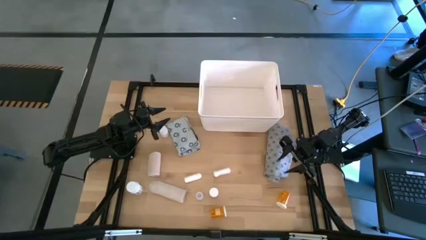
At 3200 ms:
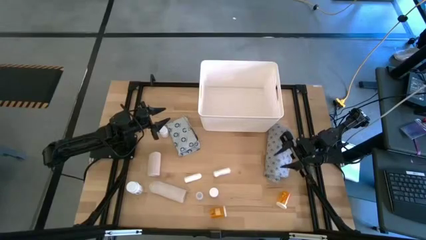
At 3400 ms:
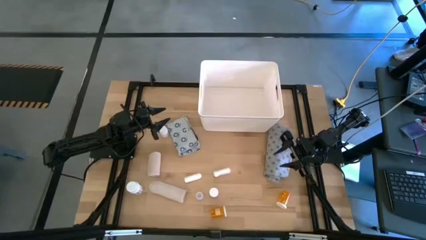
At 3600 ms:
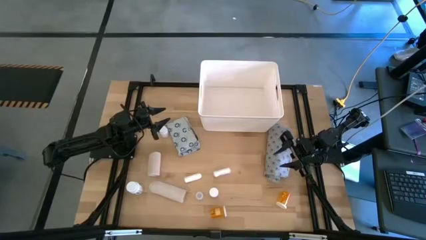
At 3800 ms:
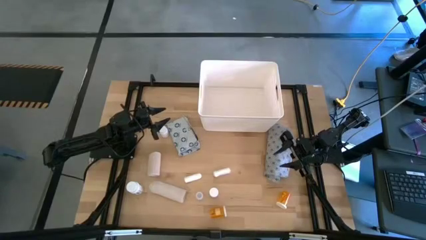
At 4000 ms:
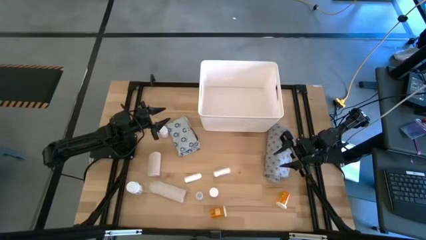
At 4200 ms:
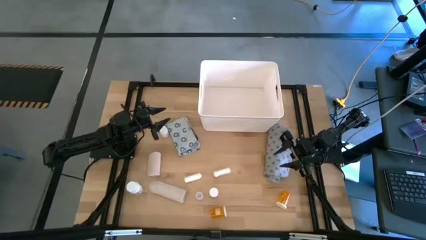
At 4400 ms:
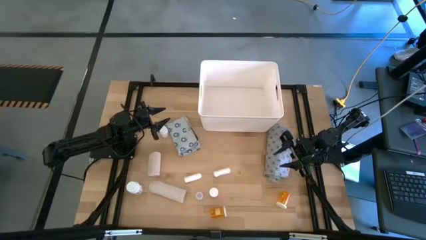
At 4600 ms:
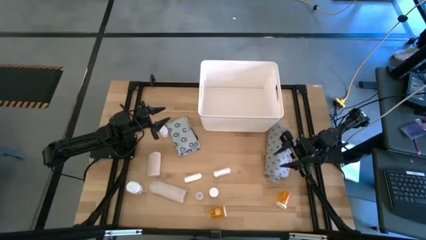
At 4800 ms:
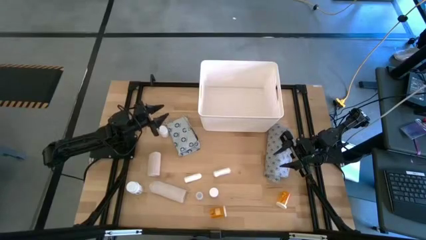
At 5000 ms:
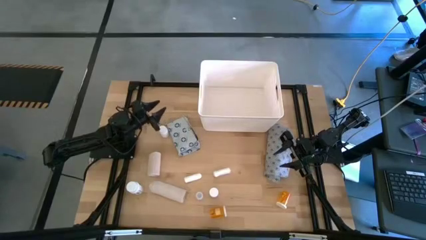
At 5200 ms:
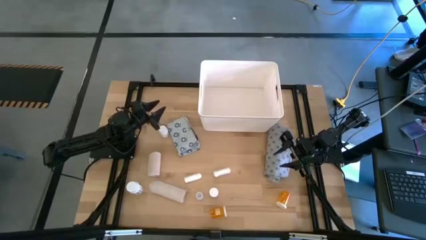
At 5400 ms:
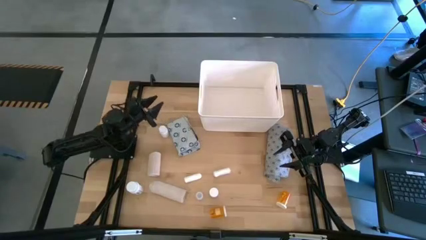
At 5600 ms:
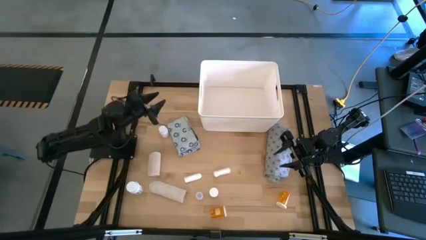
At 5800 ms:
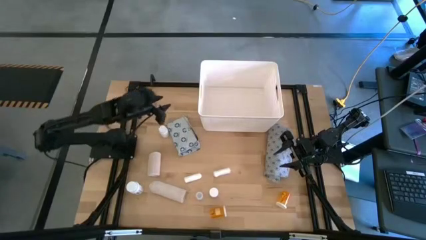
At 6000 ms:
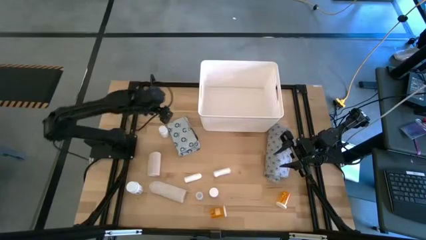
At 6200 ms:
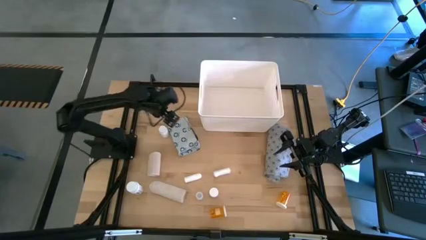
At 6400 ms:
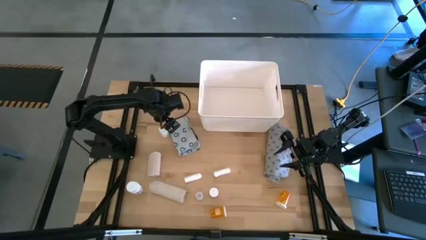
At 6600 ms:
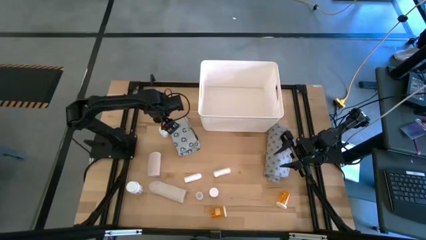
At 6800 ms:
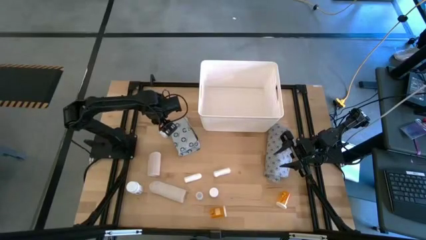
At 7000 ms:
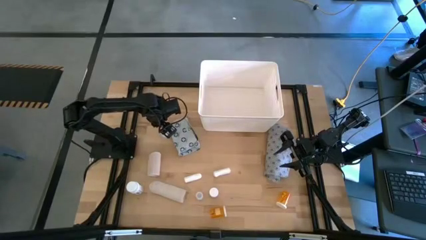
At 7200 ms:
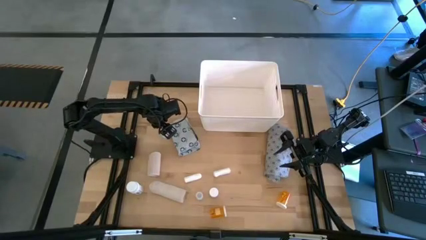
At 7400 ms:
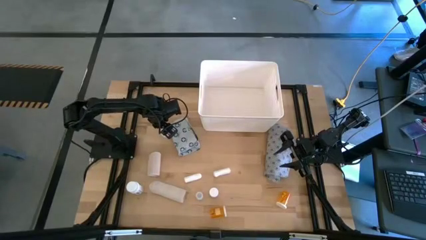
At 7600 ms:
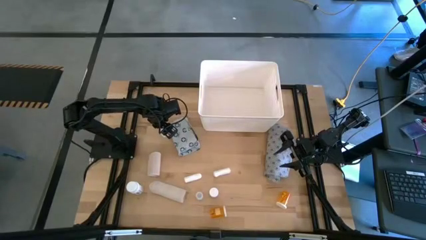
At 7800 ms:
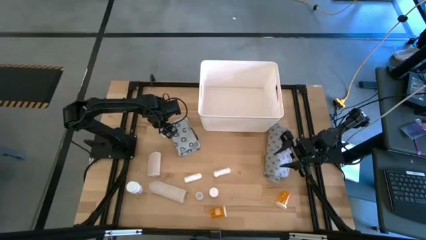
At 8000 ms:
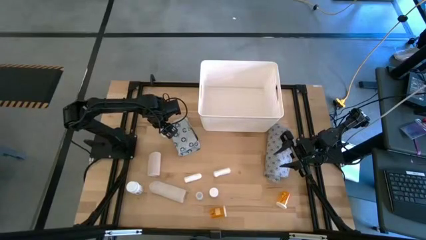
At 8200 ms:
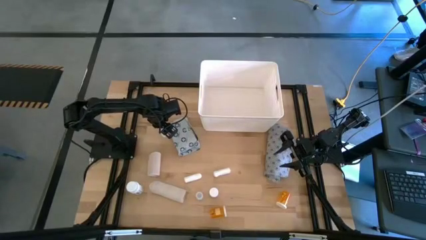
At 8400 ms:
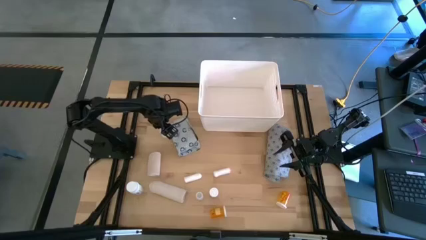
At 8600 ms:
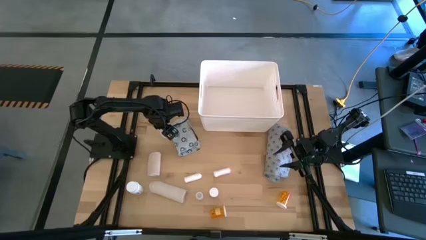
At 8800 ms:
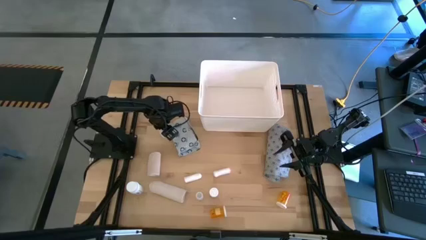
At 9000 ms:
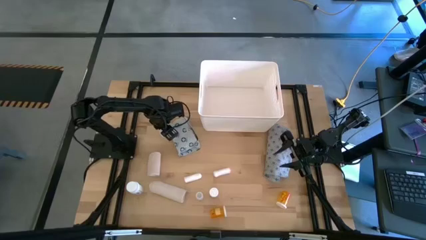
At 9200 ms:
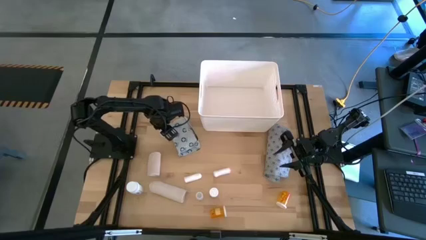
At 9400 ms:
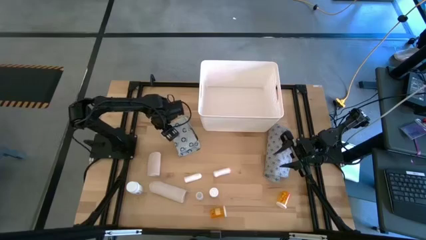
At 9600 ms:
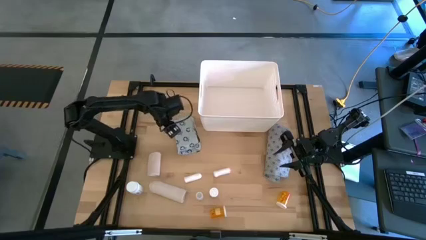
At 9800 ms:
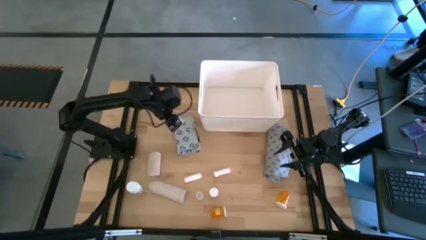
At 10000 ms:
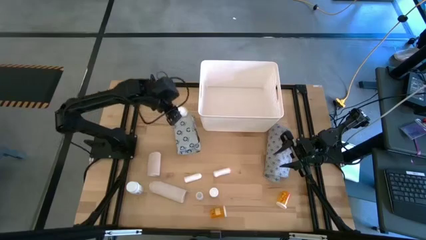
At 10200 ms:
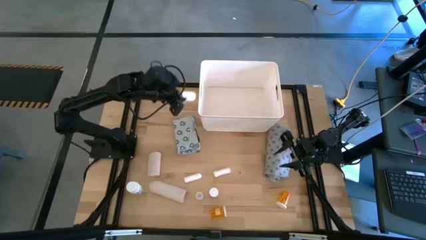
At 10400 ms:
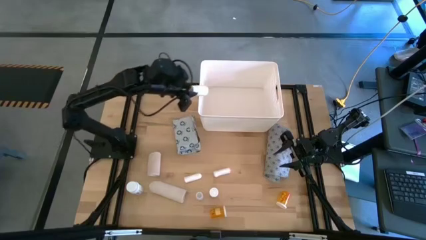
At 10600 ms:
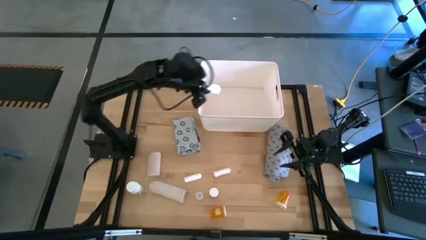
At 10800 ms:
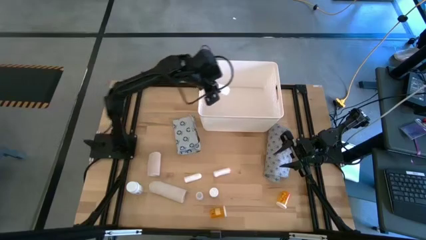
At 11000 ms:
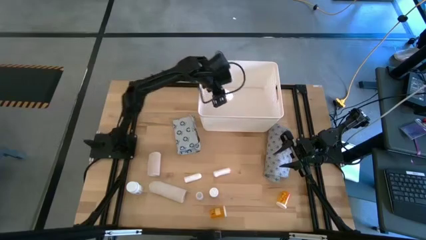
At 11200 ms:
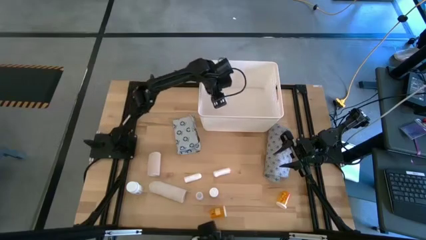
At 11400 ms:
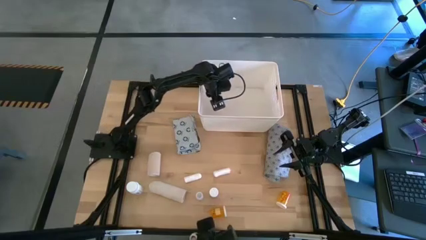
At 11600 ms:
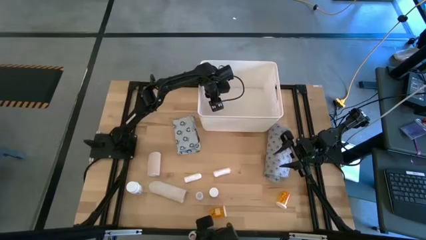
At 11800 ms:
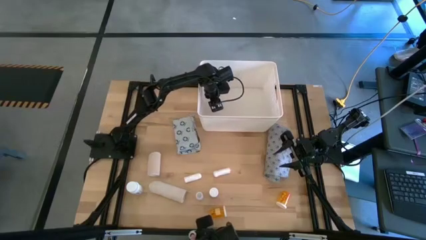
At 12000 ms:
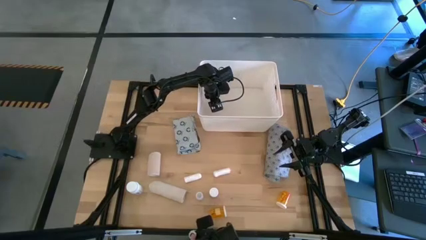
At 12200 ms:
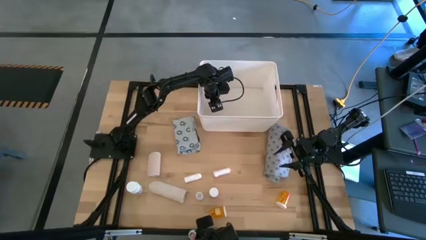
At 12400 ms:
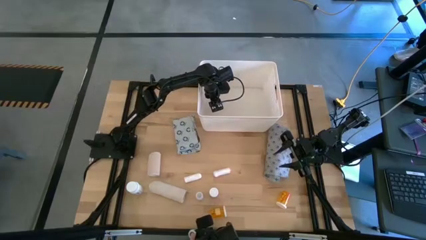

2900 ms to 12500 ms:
Task: Pick & place medical supplies in basket/bin
Put the top white pill bottle into the white bin

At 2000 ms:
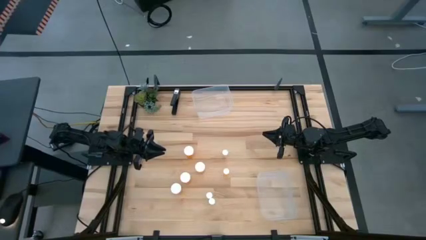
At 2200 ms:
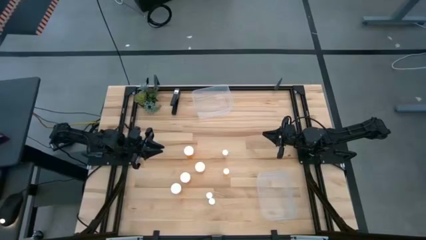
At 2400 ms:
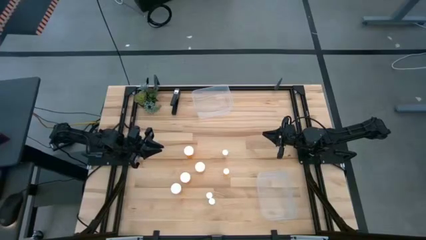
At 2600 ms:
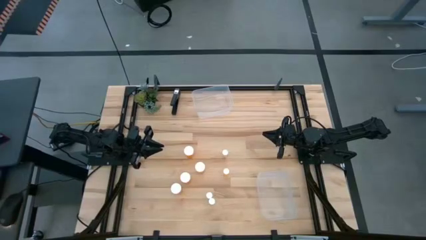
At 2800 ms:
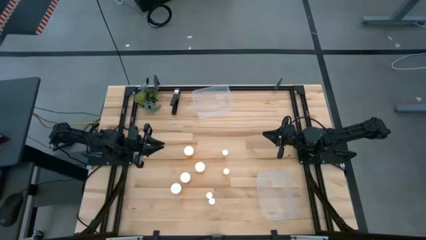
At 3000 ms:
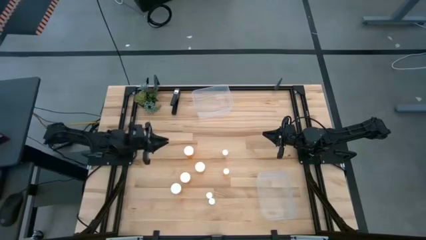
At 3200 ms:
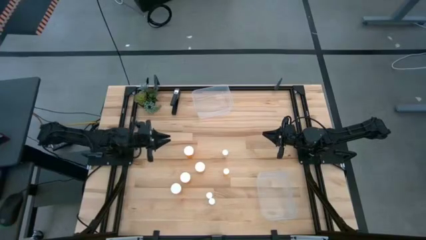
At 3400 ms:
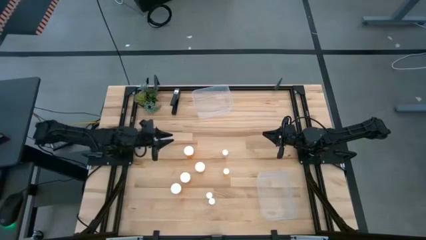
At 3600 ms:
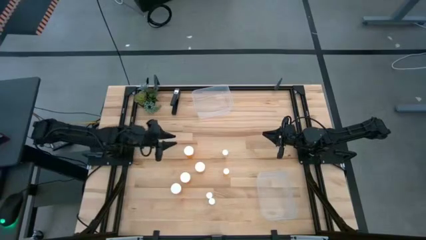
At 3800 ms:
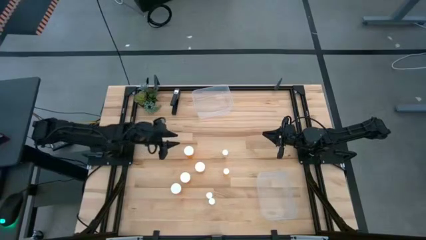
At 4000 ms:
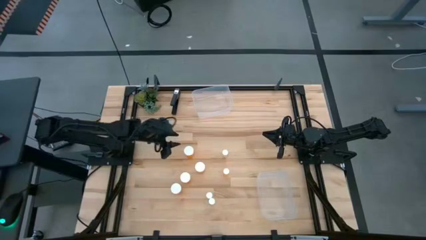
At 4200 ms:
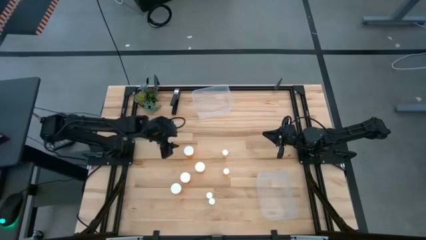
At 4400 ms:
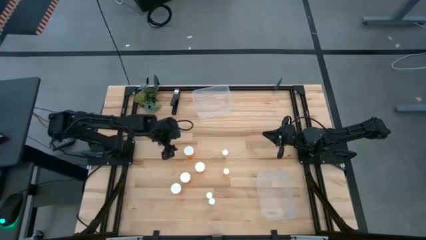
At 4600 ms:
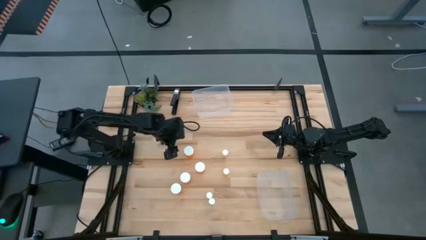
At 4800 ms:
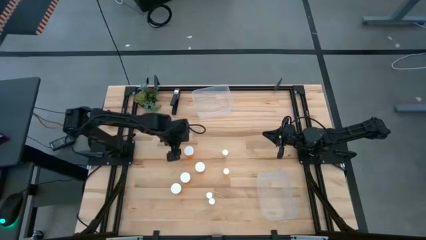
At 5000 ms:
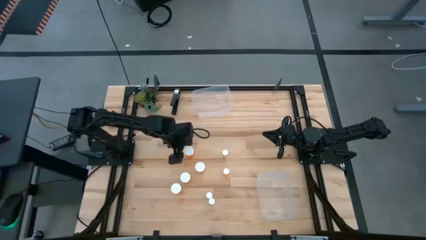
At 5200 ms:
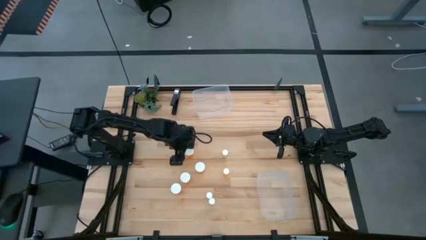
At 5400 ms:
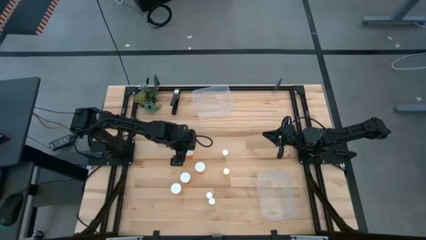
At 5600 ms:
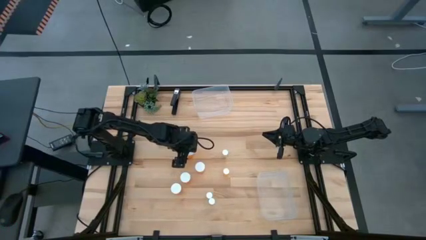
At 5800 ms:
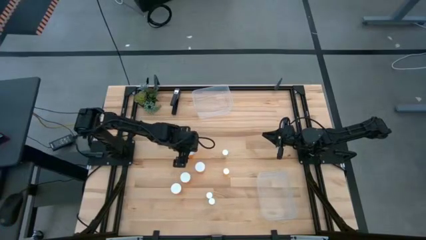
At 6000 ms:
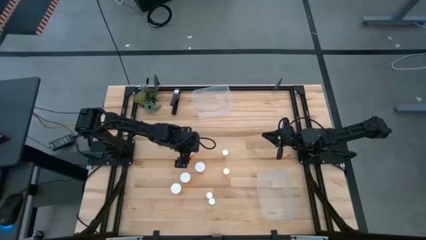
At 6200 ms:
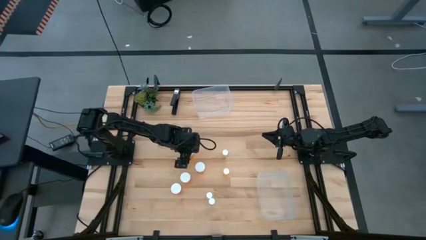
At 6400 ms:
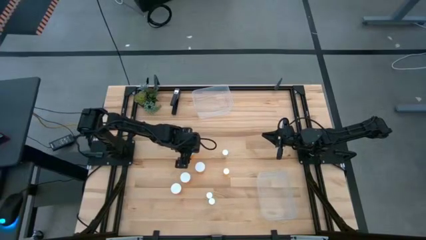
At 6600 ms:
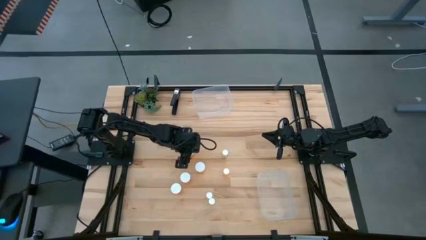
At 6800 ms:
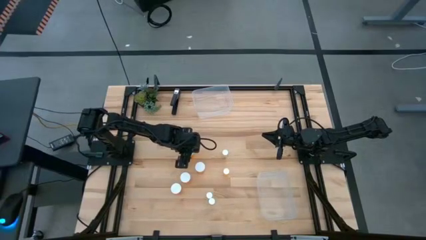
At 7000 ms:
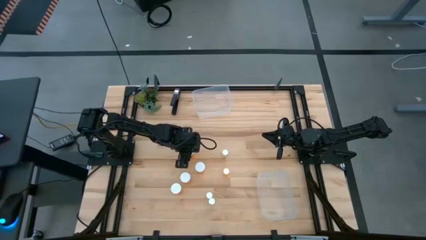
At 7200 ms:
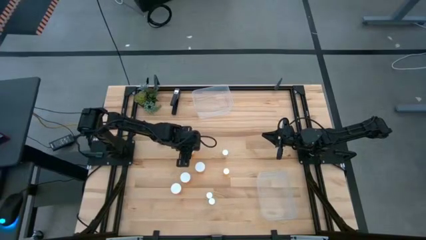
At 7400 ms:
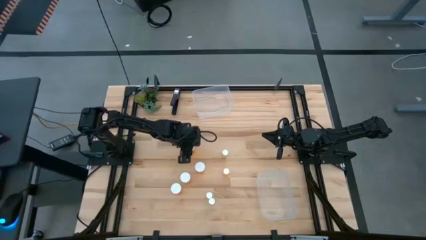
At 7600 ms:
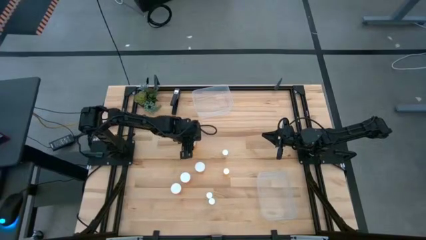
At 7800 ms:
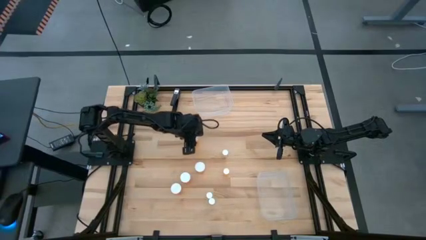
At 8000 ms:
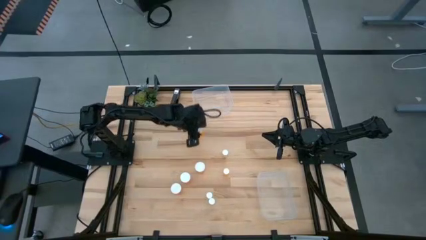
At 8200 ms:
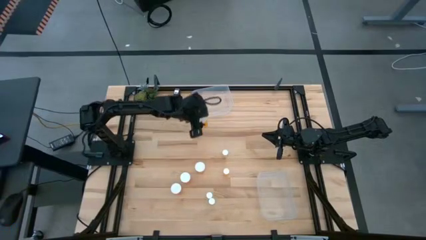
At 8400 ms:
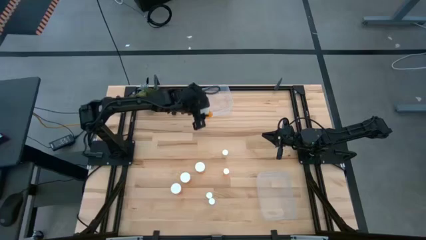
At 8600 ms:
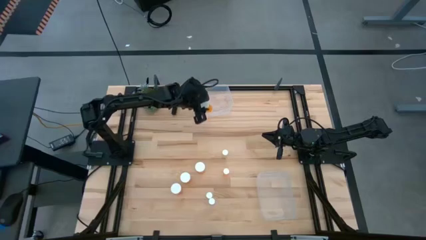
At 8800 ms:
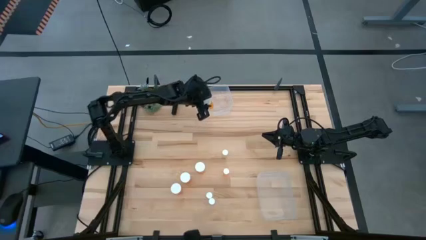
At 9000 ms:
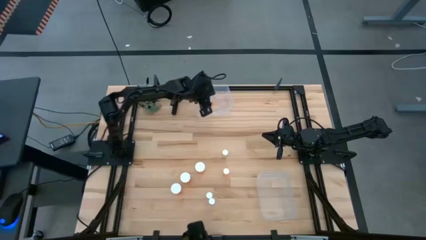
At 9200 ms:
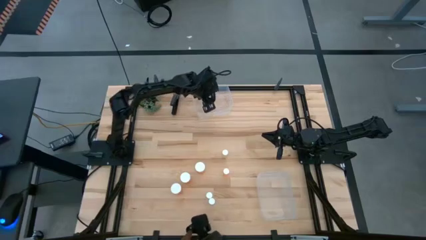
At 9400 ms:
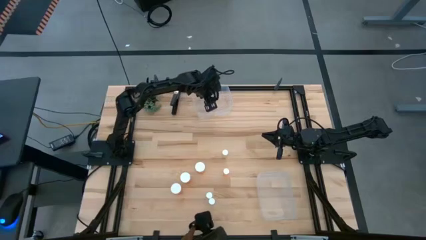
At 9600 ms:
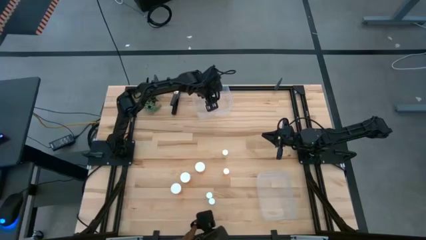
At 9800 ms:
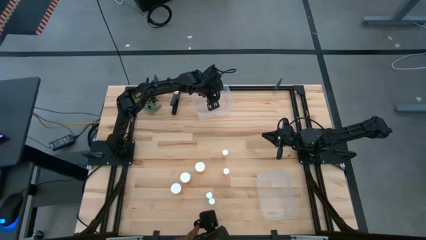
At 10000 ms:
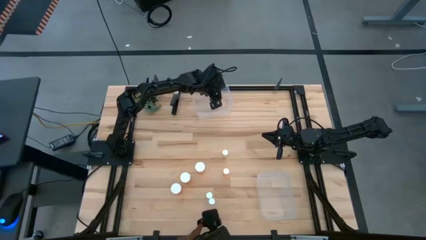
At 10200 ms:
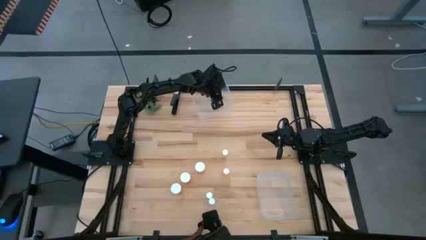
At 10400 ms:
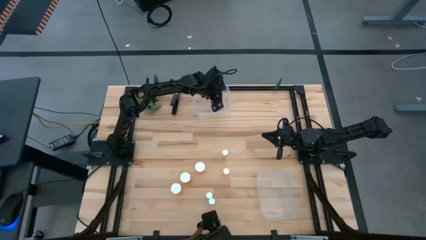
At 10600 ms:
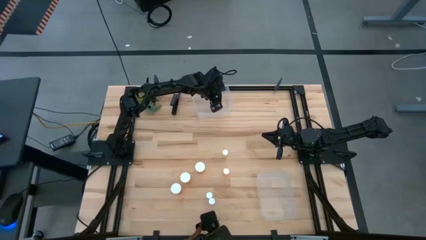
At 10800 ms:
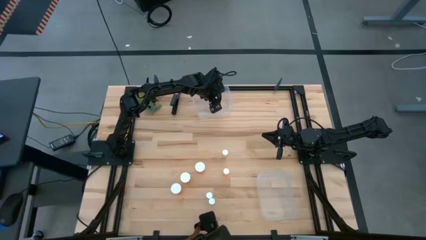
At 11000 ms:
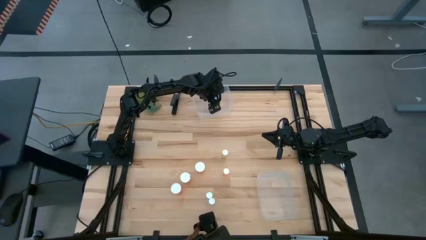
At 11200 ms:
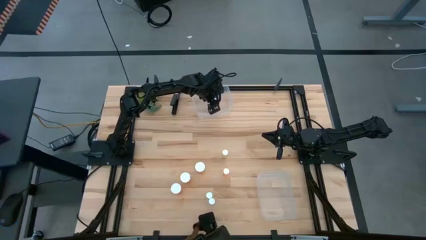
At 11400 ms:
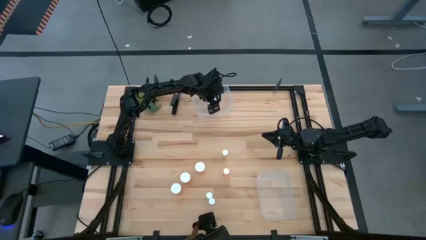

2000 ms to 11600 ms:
Task: Pick and place medicine bottles into bin by pill shape (circle, oval)
Put the big orange pill bottle into the top transparent bin
